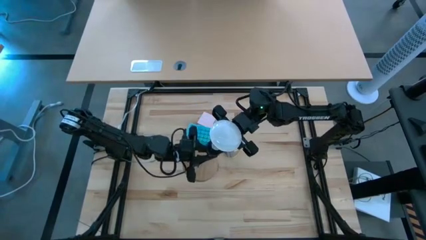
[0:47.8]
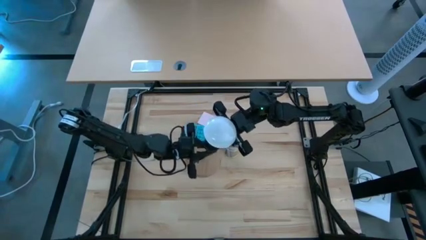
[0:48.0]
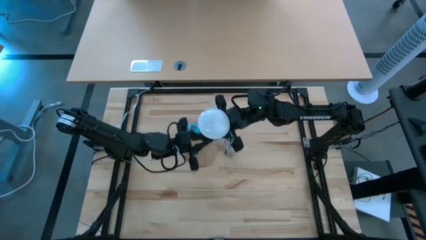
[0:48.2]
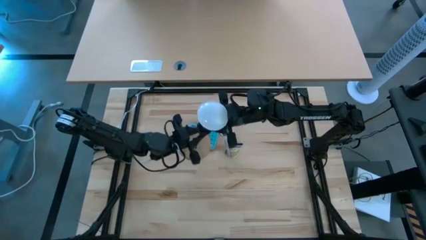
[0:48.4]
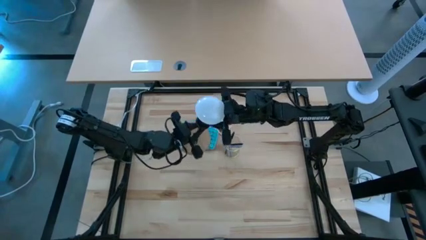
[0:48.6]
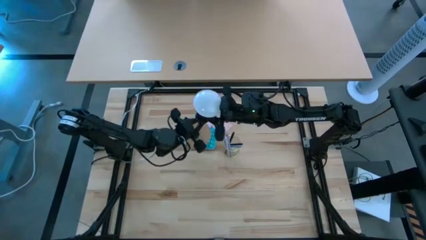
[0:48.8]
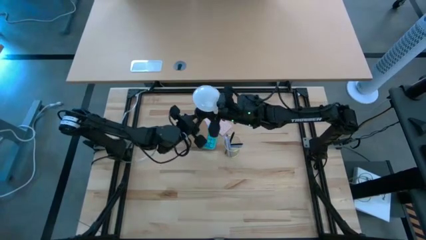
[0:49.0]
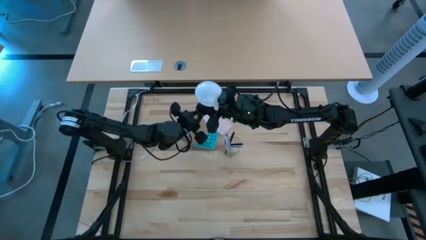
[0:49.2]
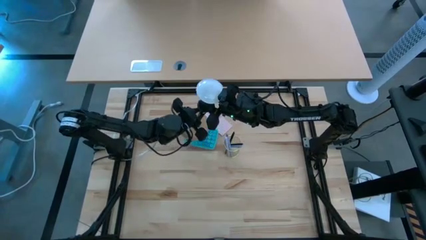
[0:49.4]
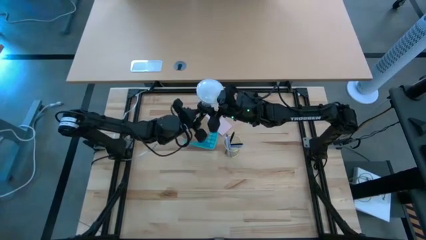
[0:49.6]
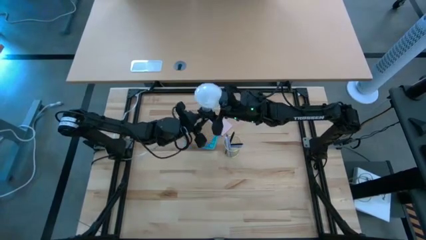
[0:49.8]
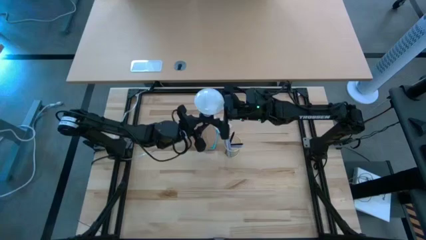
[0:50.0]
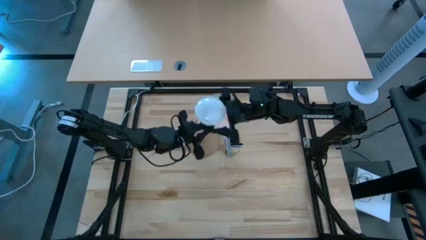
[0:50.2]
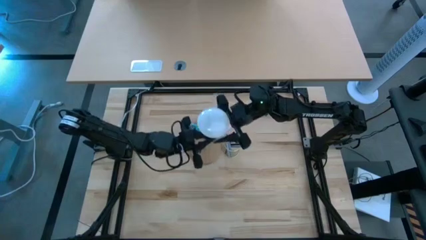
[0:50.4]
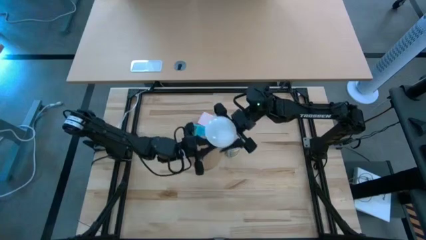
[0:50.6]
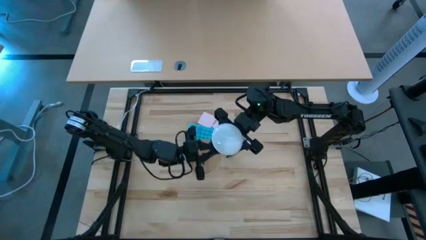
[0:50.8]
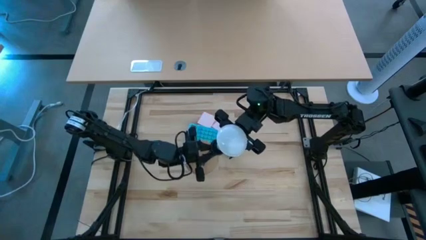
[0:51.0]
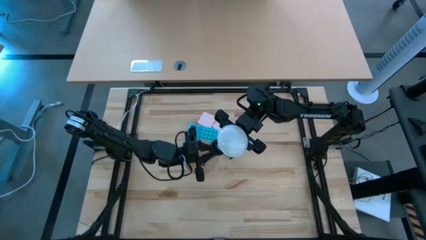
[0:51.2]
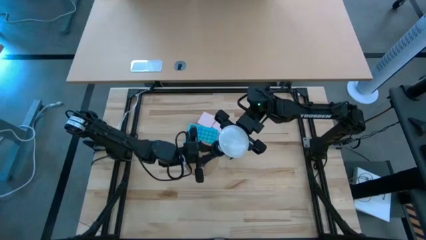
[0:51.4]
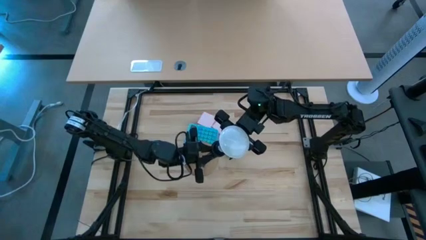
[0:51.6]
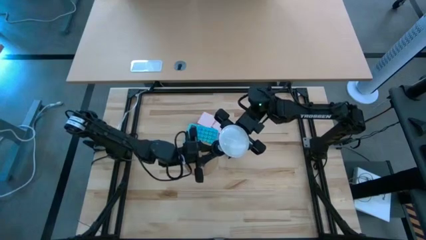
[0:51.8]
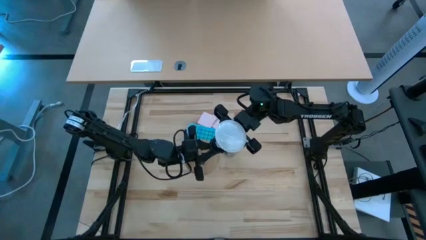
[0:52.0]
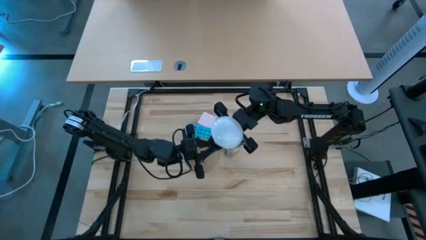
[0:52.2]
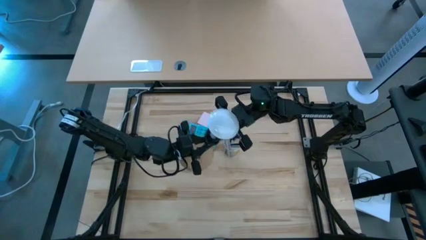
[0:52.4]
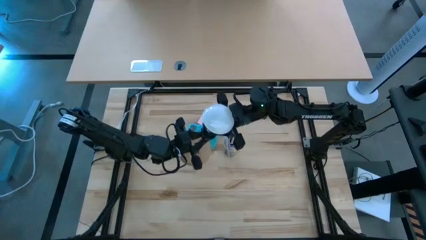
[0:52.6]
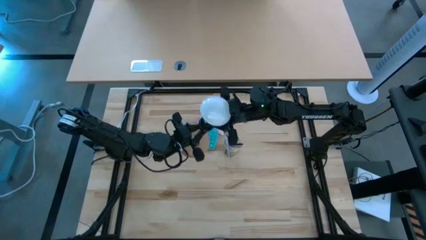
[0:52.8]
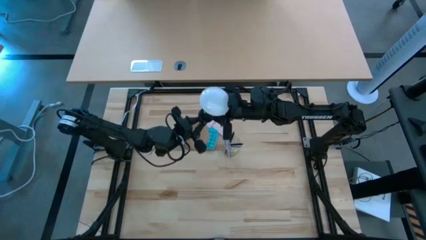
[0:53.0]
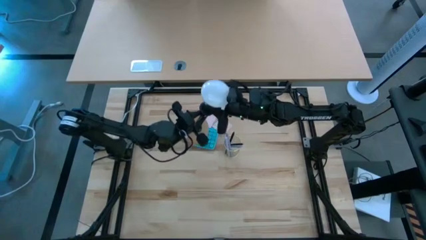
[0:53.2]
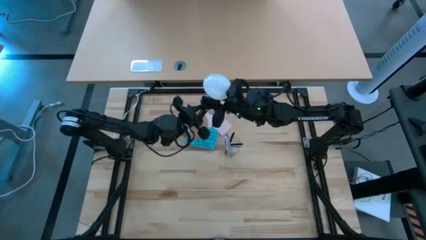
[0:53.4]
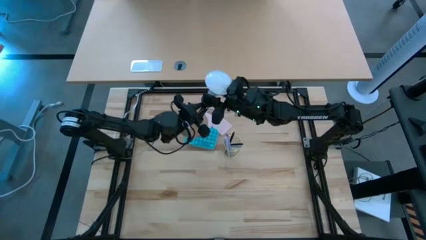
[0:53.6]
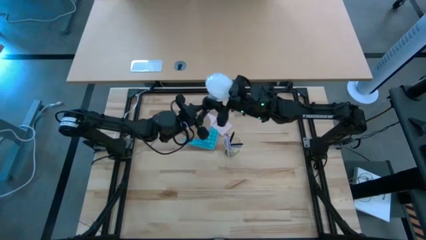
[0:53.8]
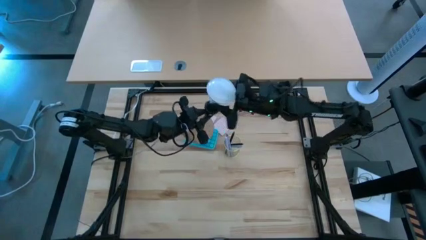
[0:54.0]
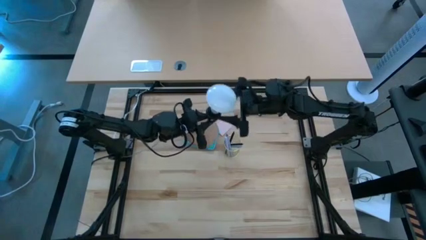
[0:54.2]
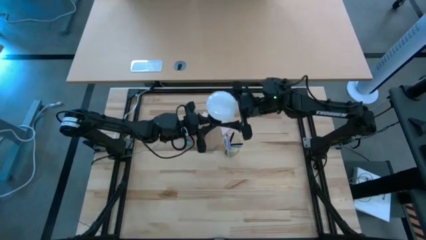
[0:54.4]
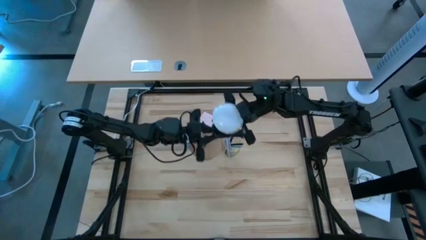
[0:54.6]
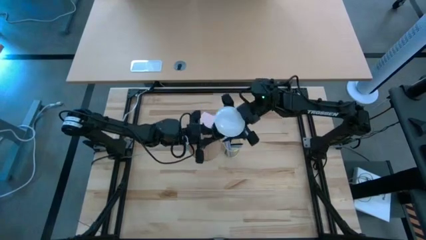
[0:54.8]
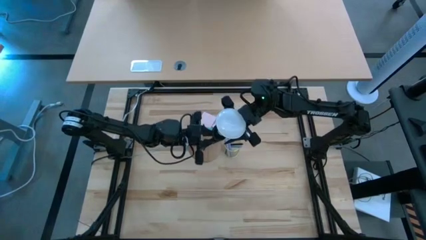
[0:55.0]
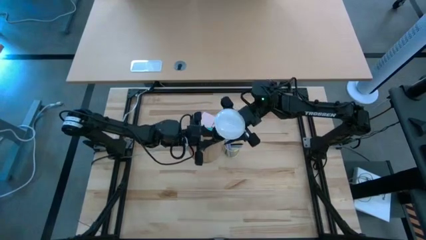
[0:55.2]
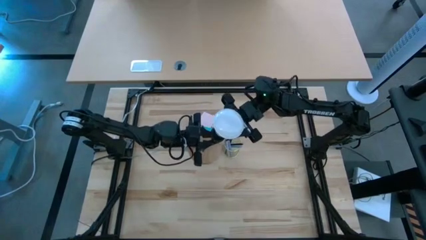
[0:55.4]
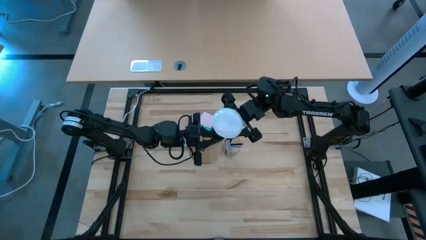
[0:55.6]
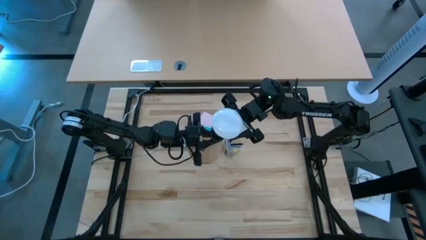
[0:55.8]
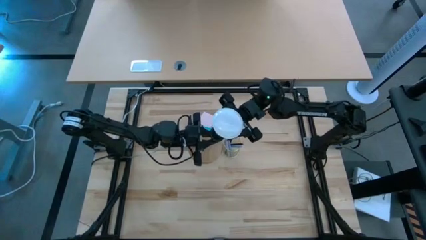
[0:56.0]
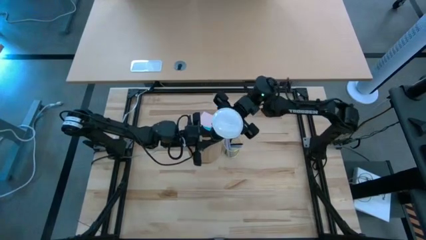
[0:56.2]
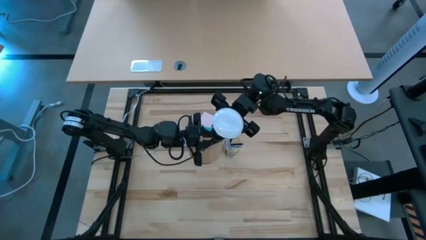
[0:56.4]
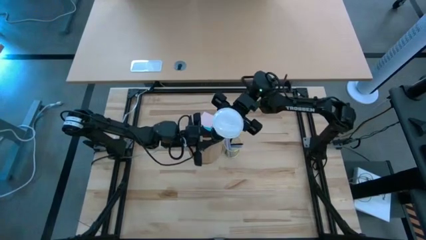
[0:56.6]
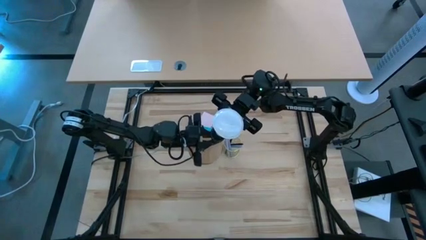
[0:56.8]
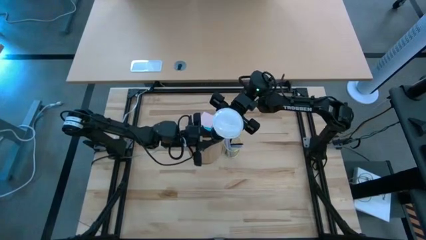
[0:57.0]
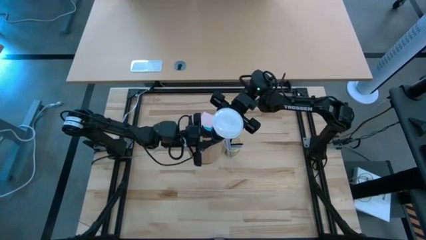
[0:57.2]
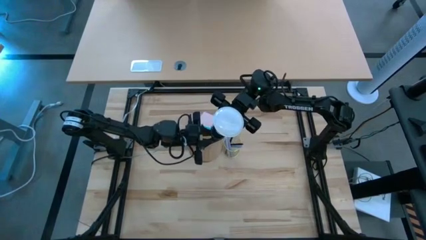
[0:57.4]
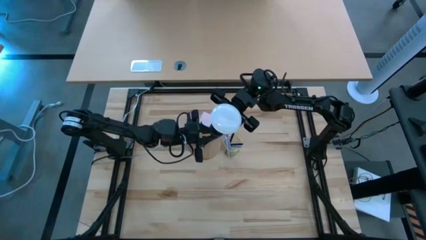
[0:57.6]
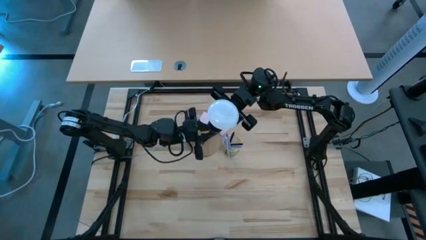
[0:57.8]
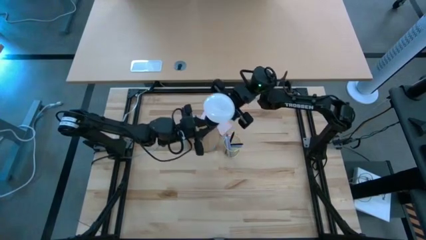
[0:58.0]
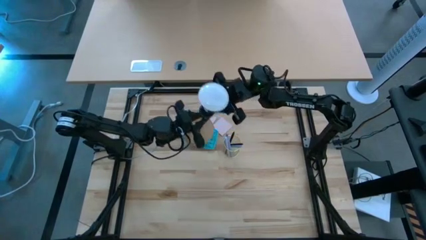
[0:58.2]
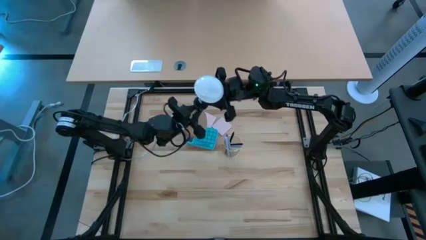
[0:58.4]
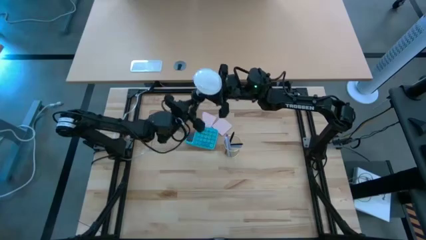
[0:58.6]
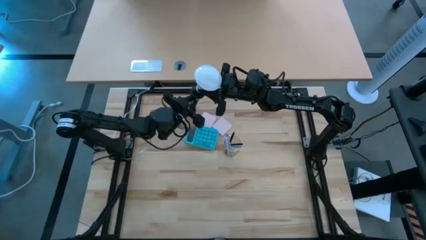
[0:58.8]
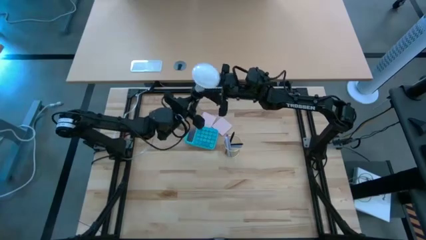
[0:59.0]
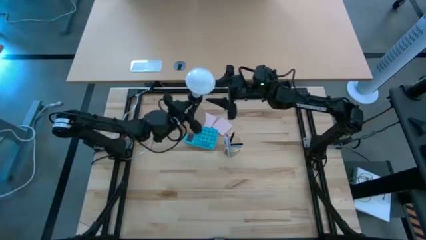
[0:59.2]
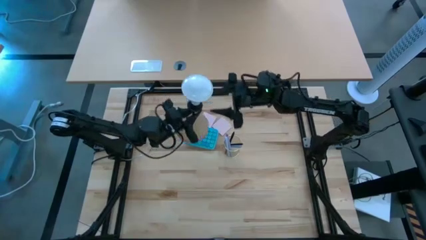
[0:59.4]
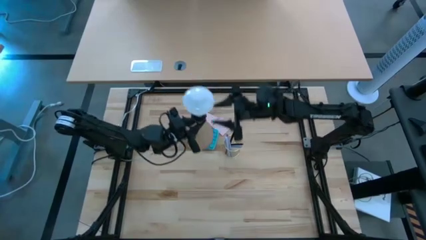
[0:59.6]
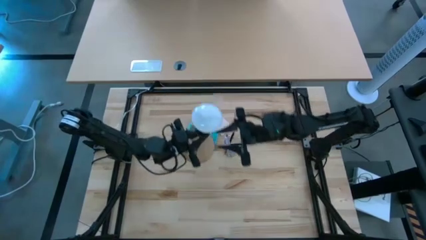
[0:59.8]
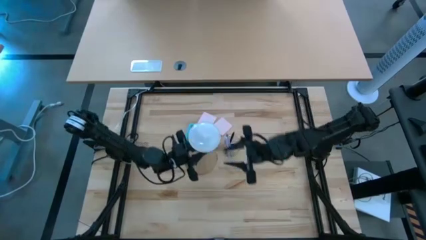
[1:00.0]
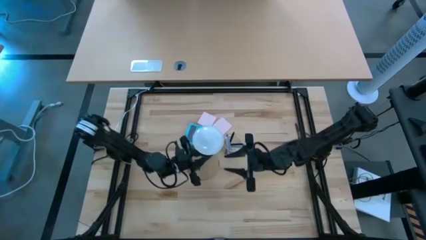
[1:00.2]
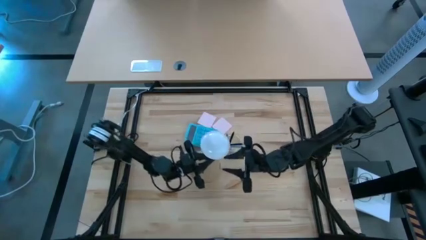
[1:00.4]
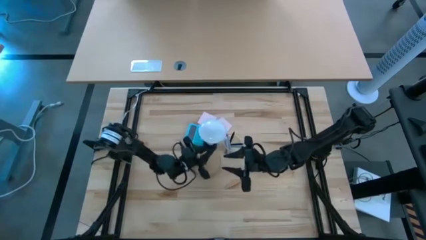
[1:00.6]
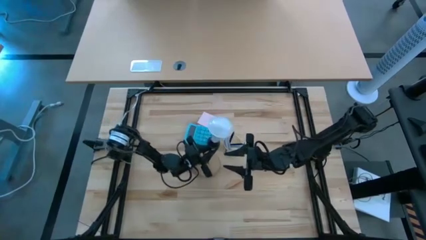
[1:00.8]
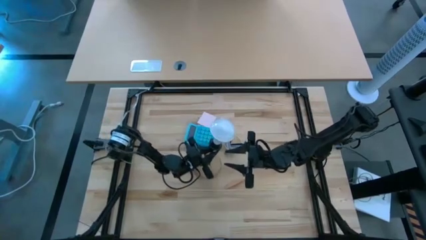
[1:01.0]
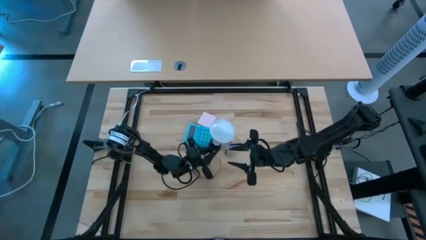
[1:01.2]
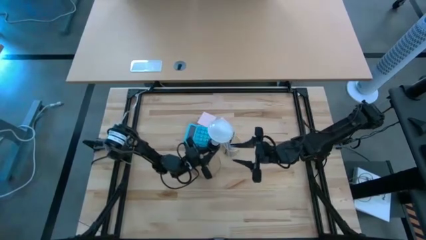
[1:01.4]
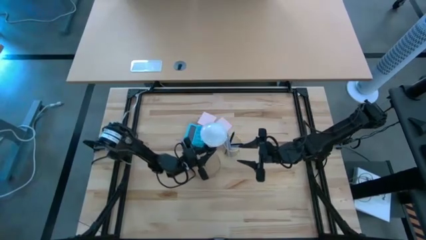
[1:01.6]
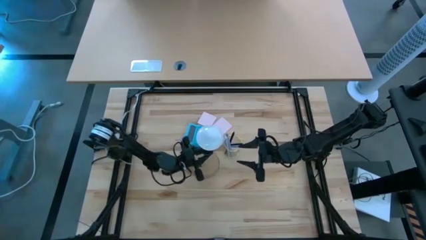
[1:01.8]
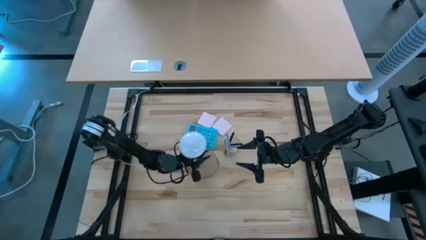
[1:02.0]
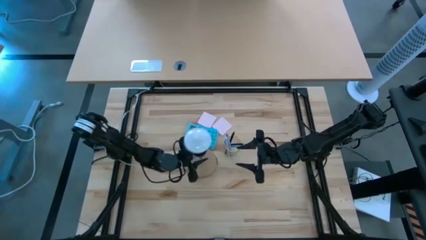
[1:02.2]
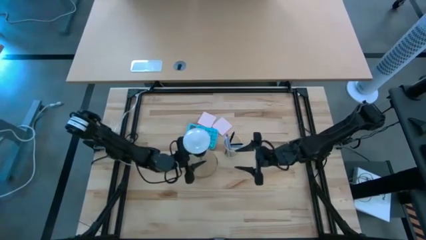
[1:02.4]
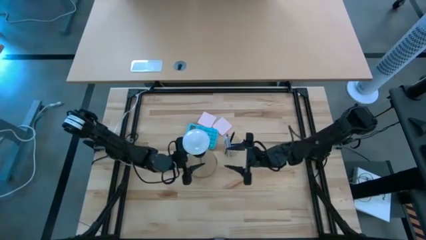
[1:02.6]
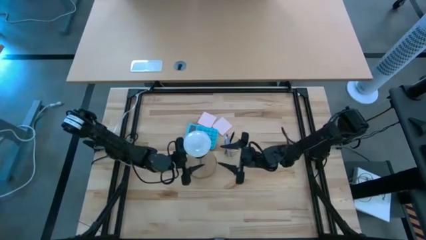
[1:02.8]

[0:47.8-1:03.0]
Task: Screw lightbulb
Insert the lightbulb into the black table lamp

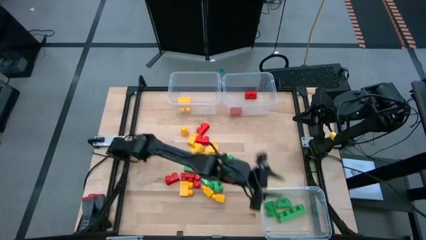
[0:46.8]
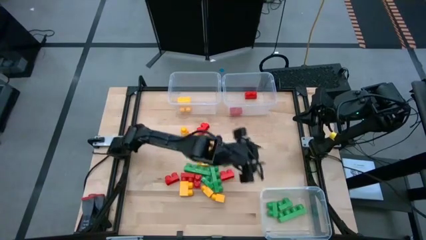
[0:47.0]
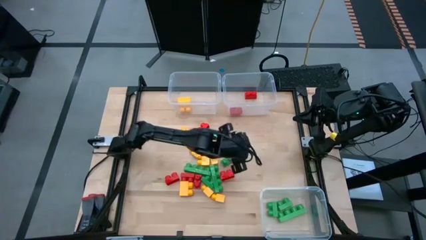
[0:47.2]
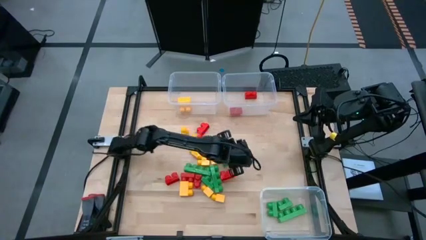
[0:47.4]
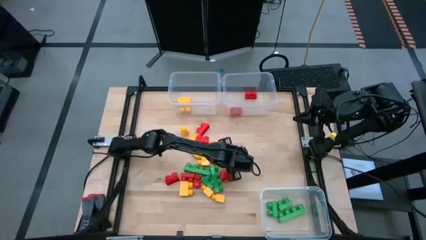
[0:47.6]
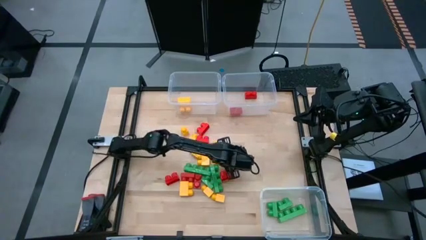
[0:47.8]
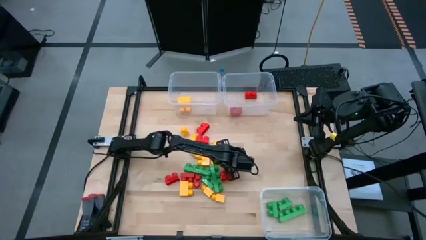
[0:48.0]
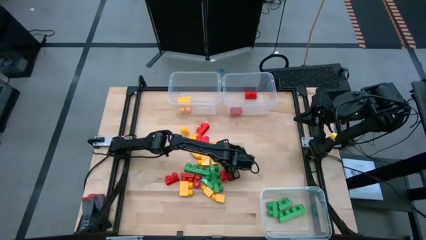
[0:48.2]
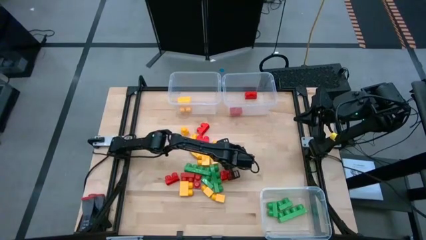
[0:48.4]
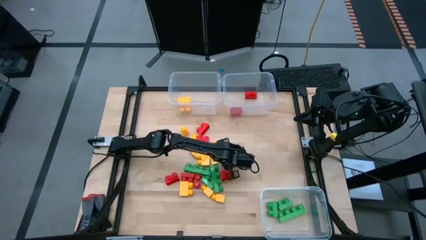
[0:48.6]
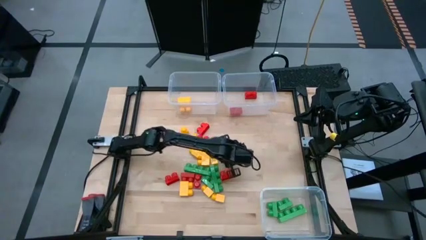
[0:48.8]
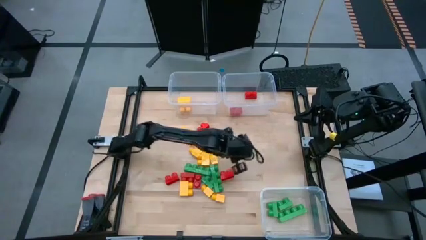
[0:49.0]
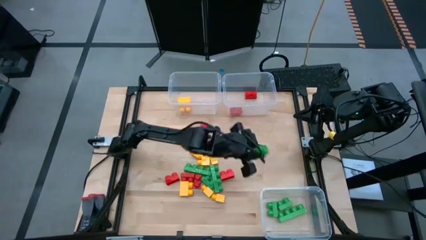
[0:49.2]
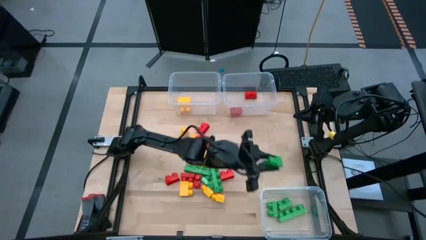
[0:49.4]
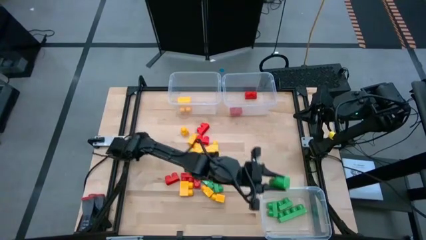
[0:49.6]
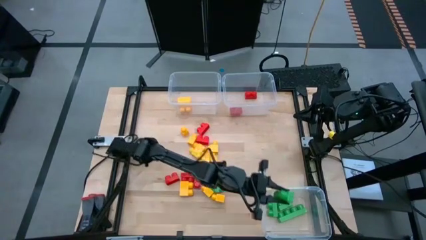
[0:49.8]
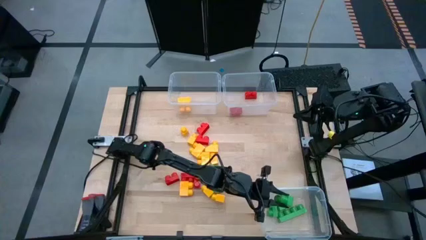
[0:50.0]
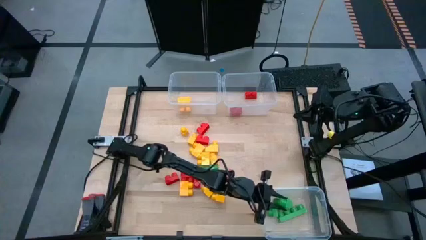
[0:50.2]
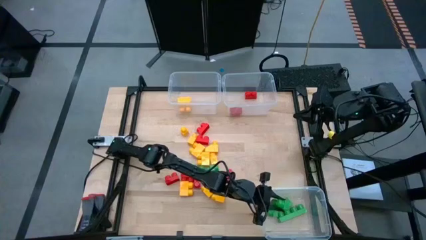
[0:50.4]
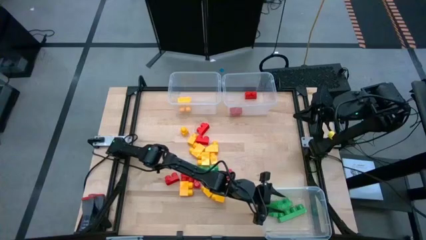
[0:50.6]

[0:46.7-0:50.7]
Task: Sort blocks
Put the green game piece into the bottom right transparent bin
